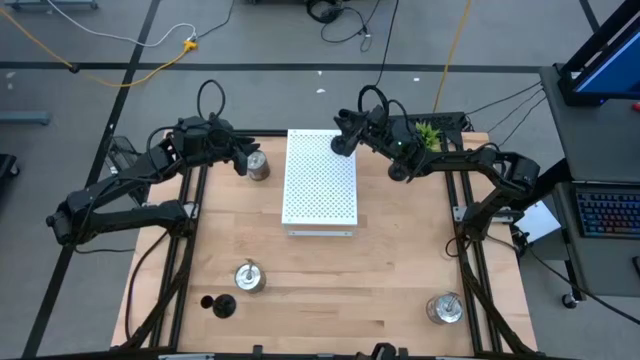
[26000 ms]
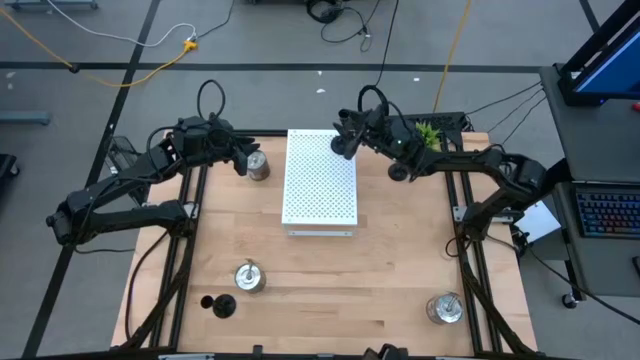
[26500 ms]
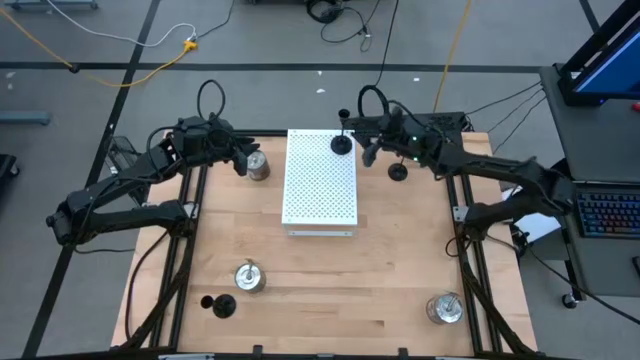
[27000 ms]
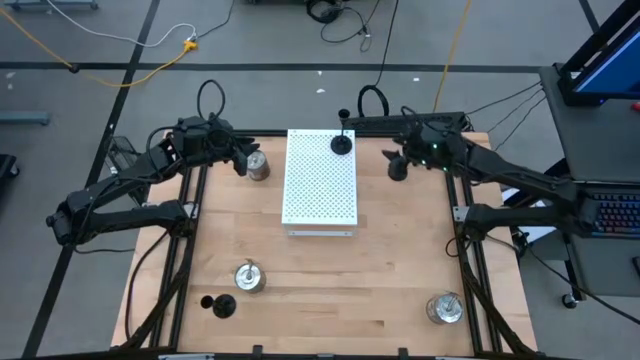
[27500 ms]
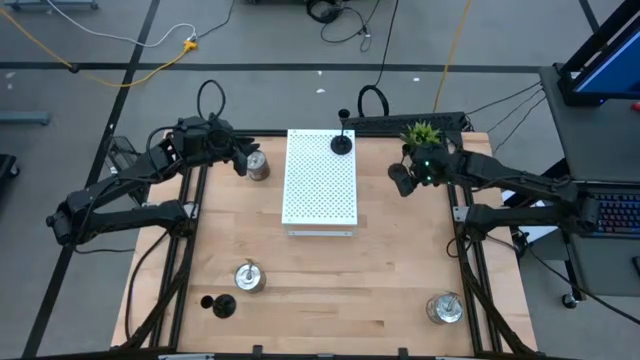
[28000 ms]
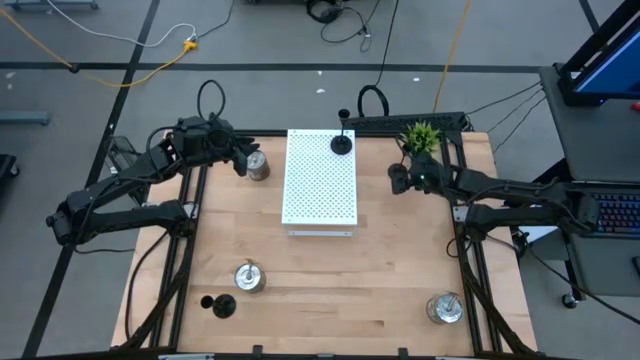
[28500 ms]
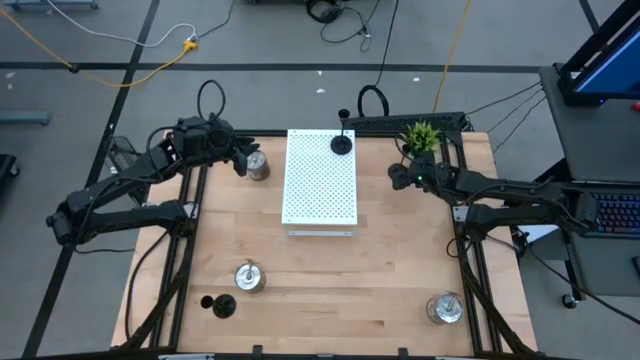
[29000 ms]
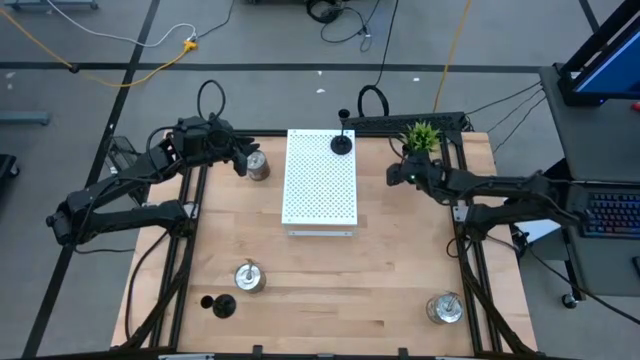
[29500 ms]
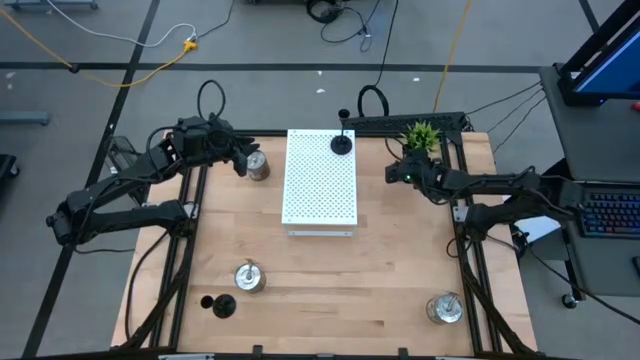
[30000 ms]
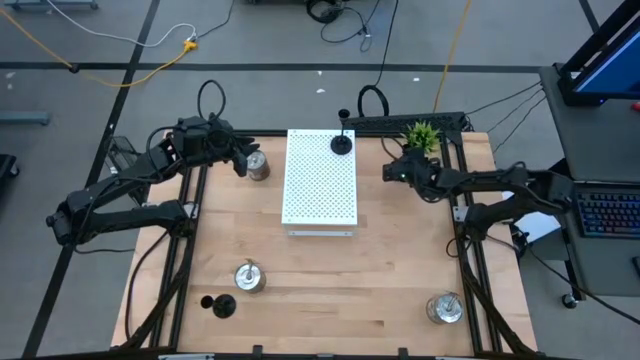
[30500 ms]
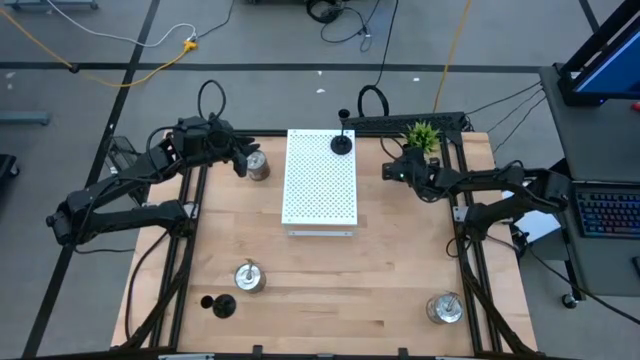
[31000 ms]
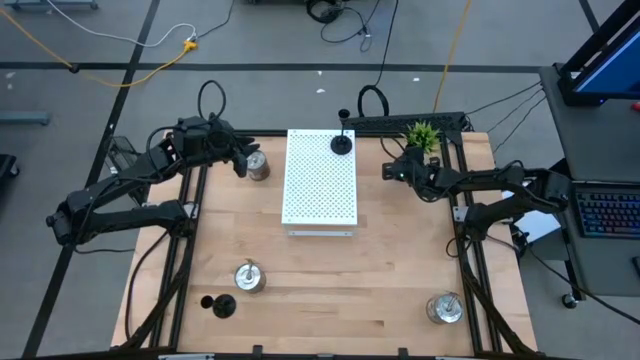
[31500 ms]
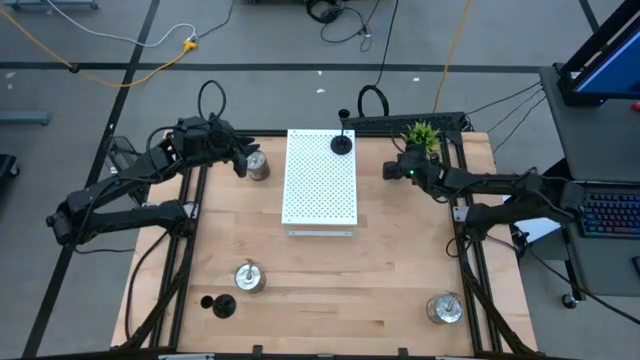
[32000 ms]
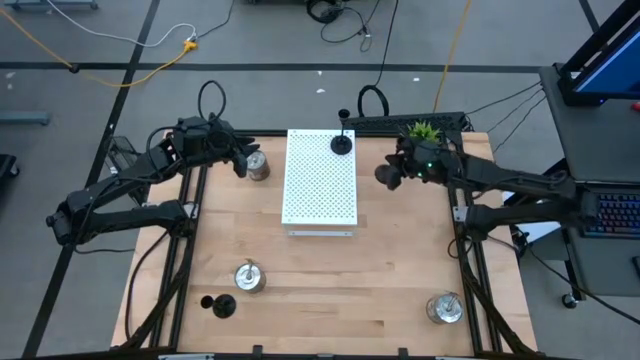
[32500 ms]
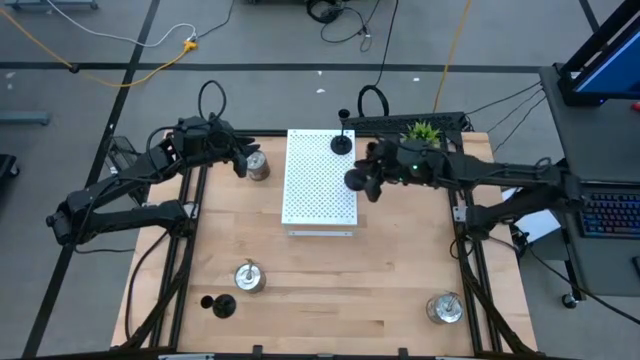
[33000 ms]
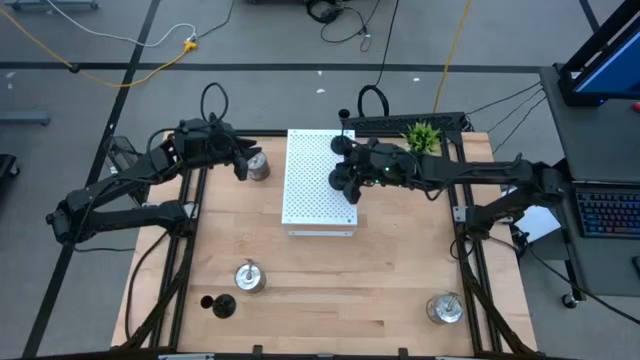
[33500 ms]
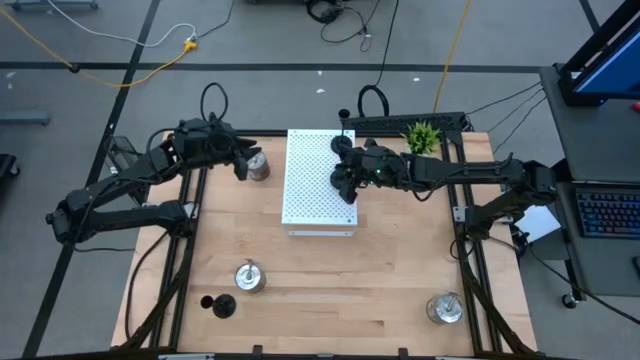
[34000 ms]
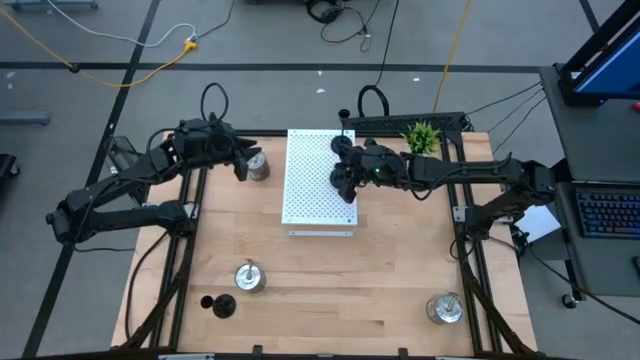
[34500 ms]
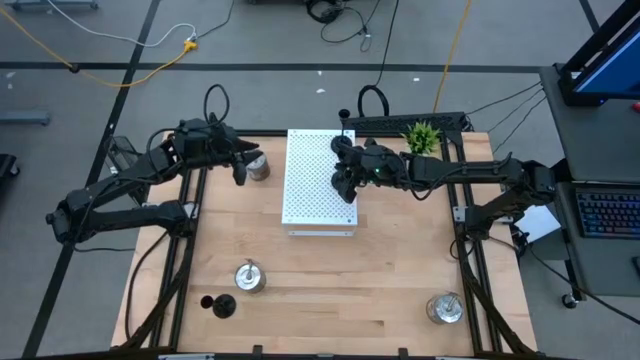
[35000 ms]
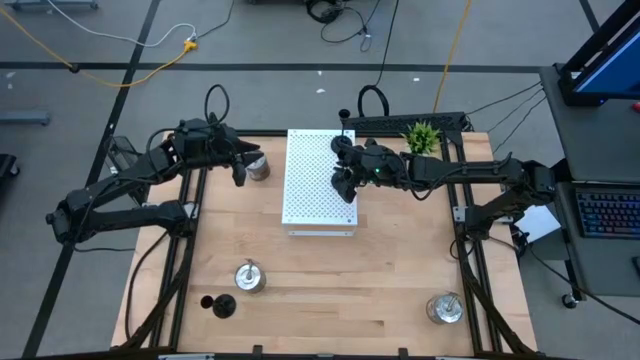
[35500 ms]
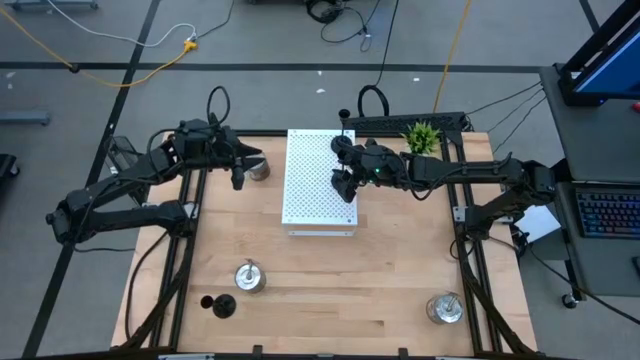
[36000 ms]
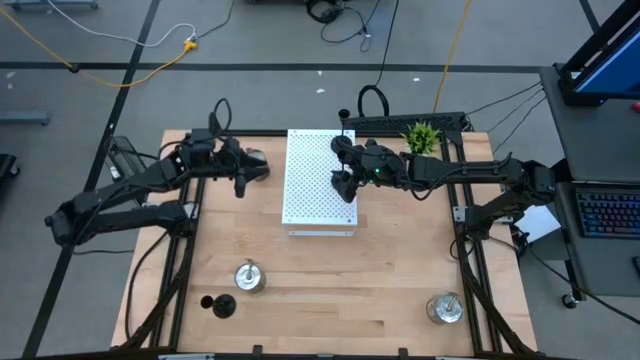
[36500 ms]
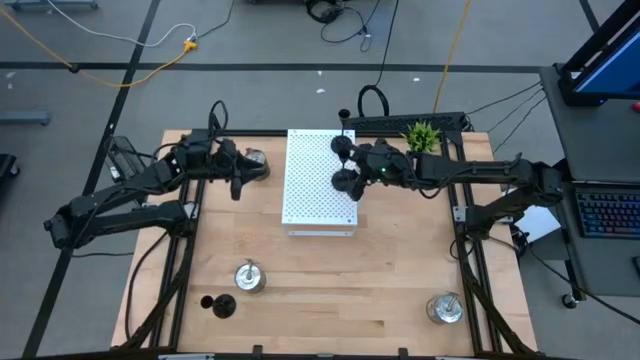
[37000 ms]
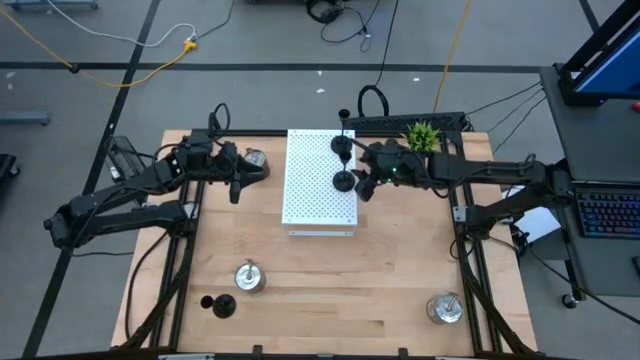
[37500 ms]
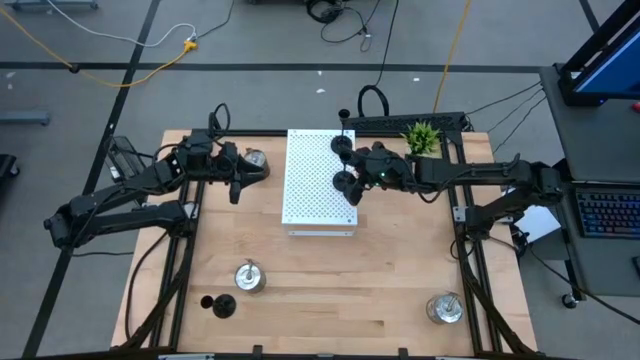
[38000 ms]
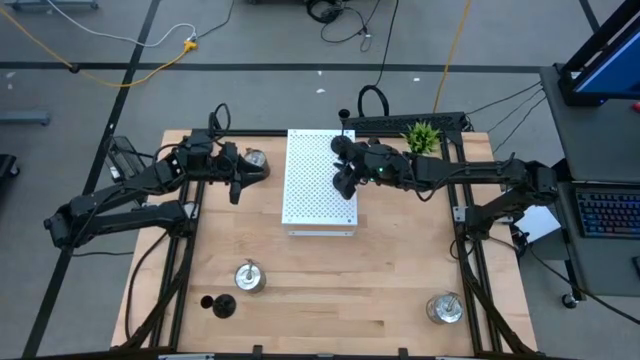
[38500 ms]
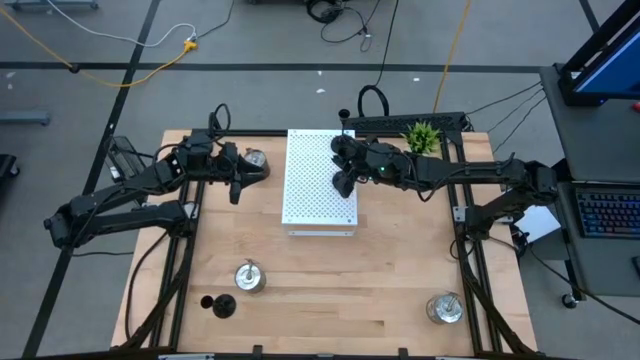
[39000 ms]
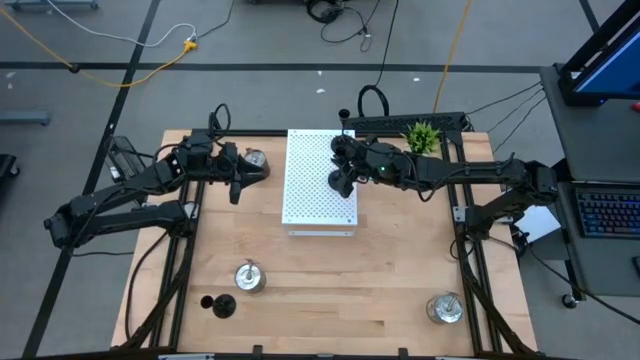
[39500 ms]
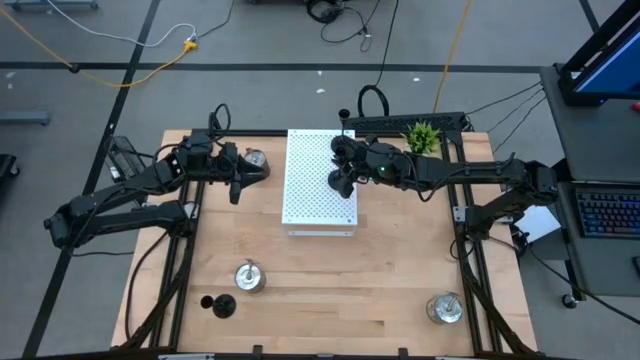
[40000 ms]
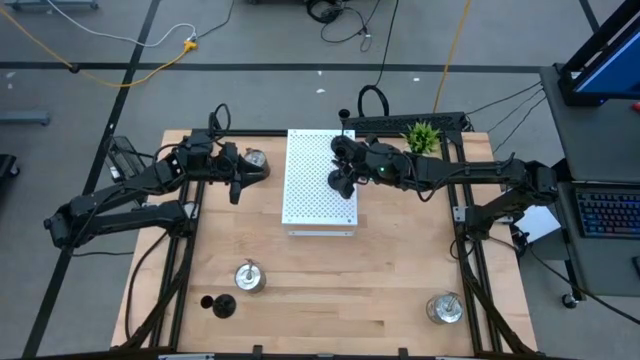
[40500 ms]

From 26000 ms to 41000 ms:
Task: Pick & Place candle stick holders
Put the top black candle holder on the shelf aligned with the other black candle holder
